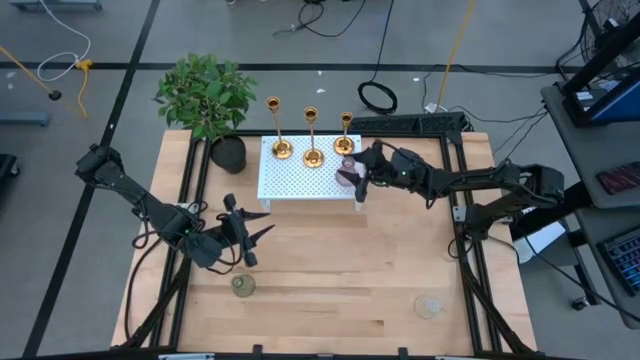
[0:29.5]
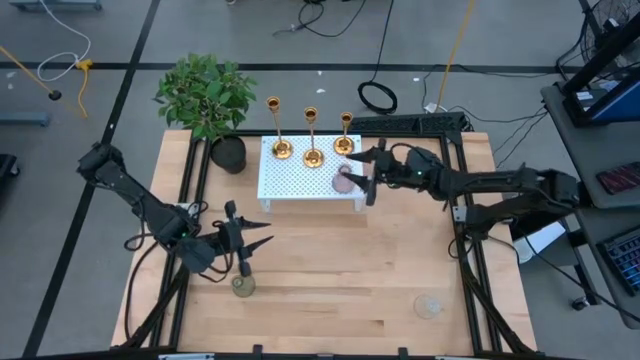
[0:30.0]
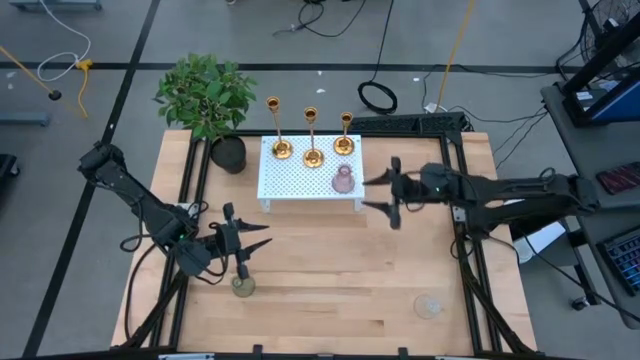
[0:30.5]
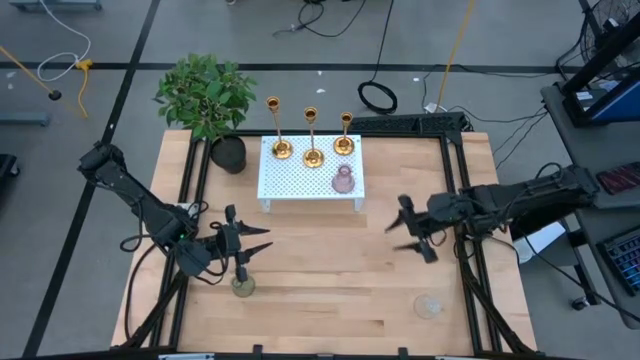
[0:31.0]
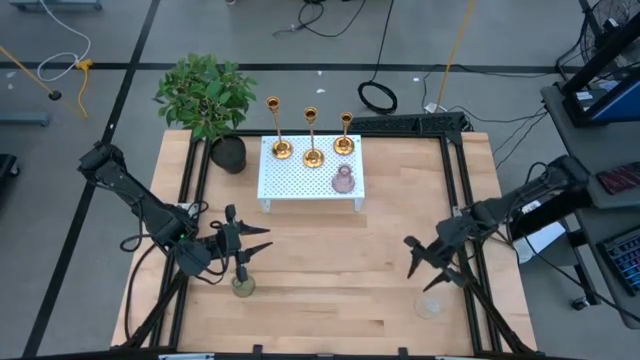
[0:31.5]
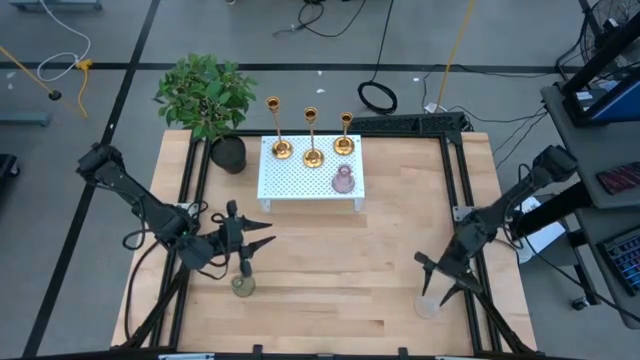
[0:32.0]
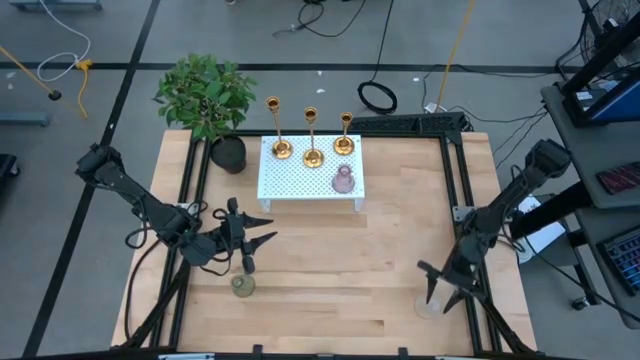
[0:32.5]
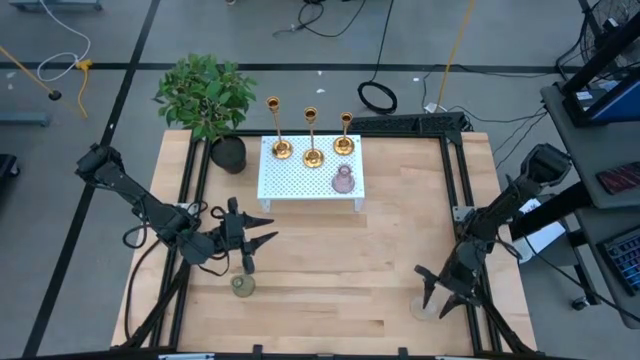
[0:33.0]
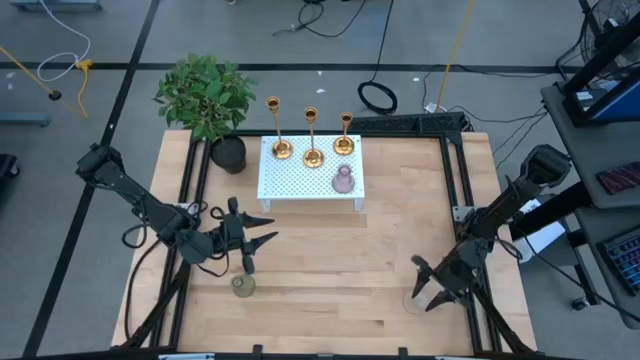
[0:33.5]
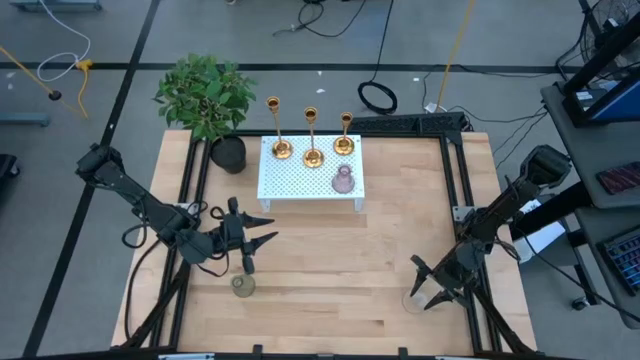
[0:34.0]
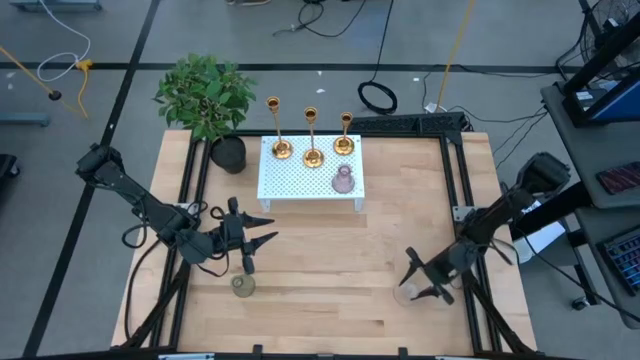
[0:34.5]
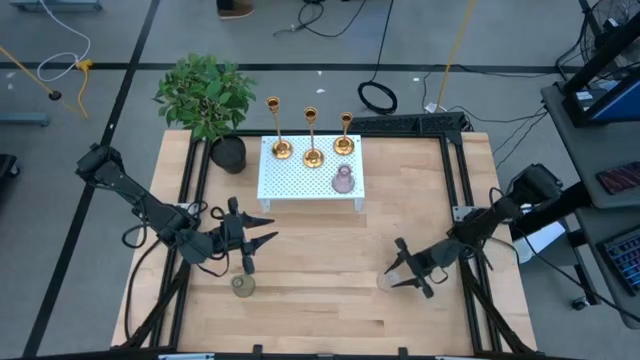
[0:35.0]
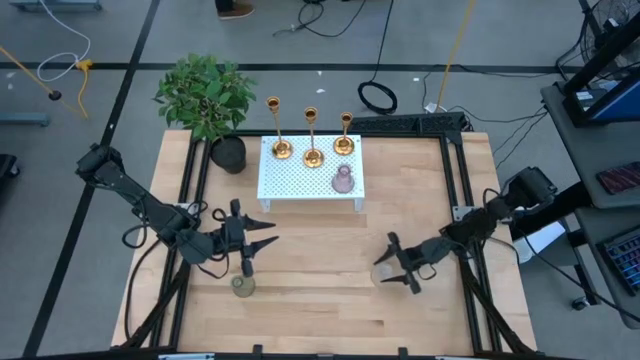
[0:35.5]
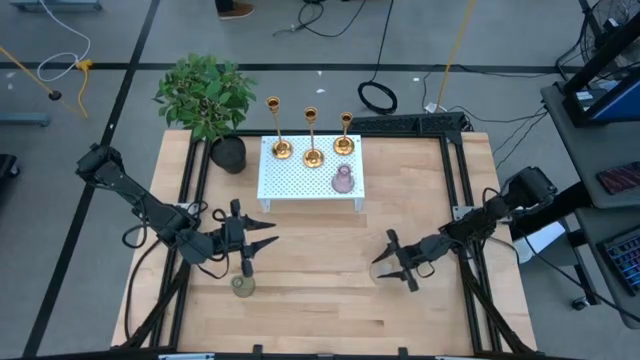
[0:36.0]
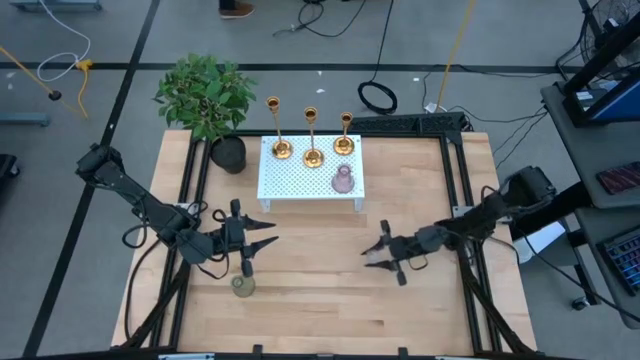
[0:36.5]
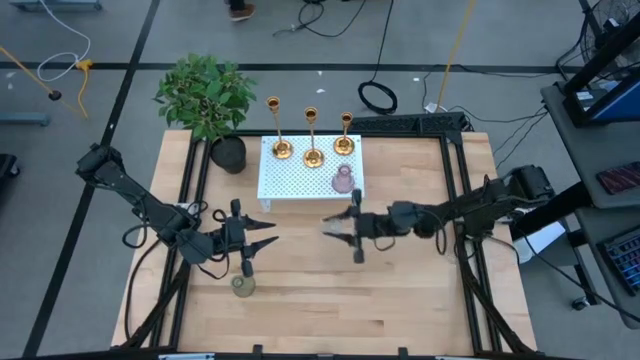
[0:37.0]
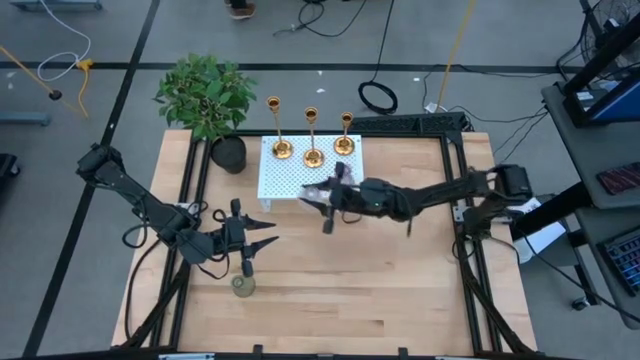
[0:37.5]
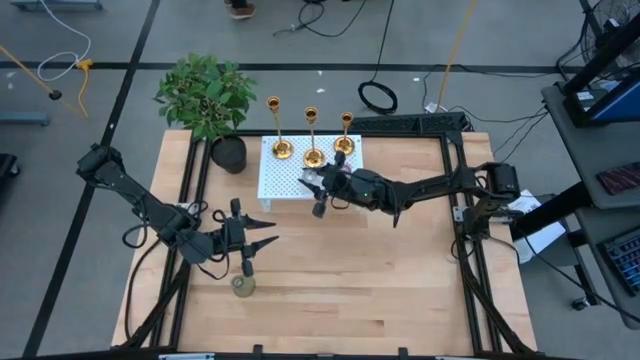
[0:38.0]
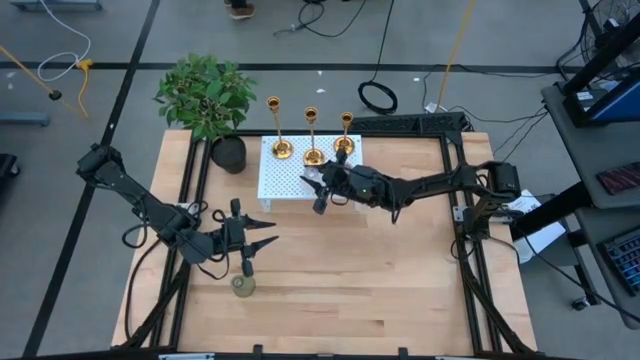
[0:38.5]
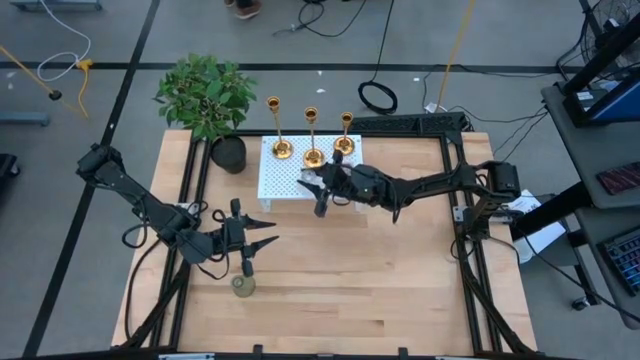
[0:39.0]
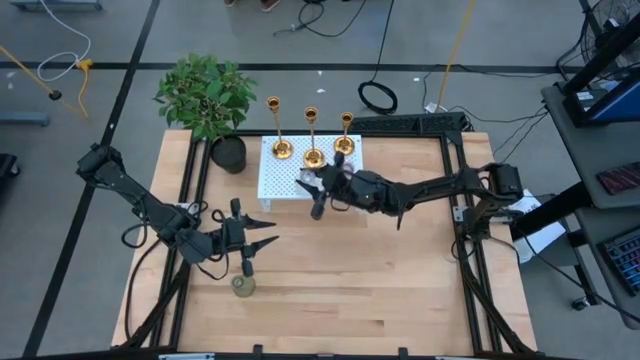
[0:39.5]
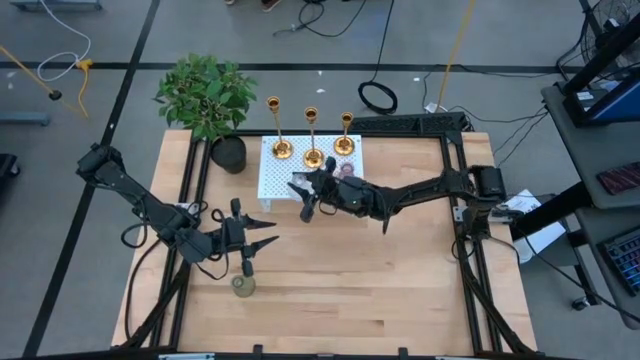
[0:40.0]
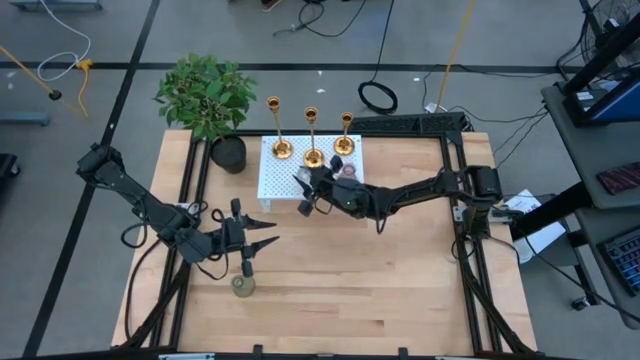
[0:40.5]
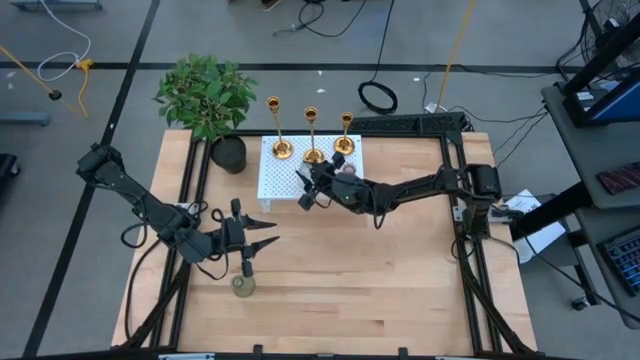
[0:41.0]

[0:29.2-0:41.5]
Task: Pick & Place candle stick holders
Put the right transparent candle holder on the shelf

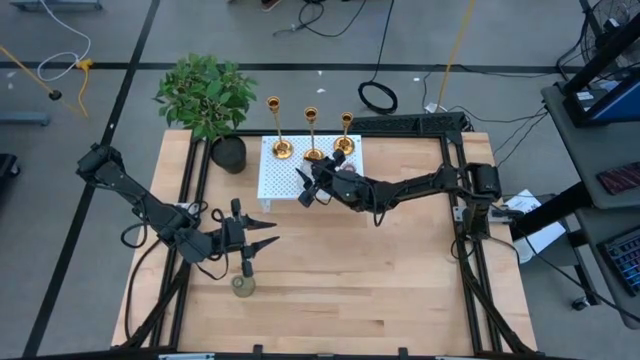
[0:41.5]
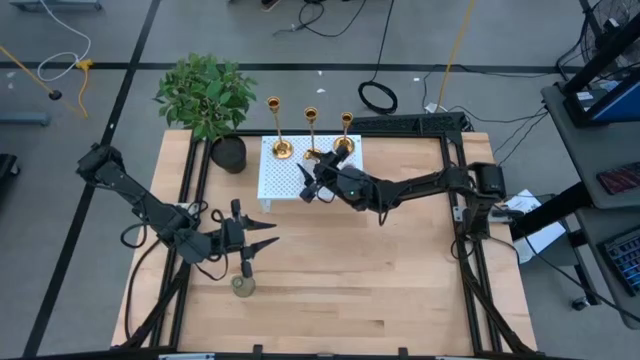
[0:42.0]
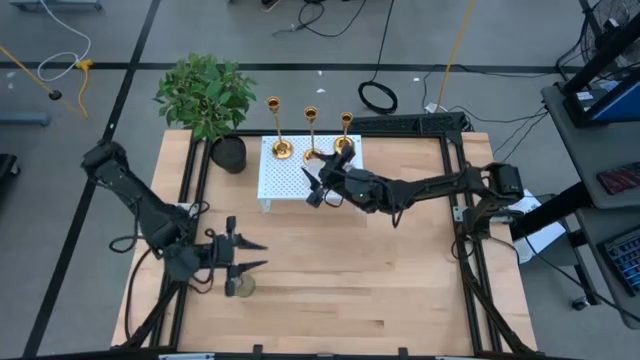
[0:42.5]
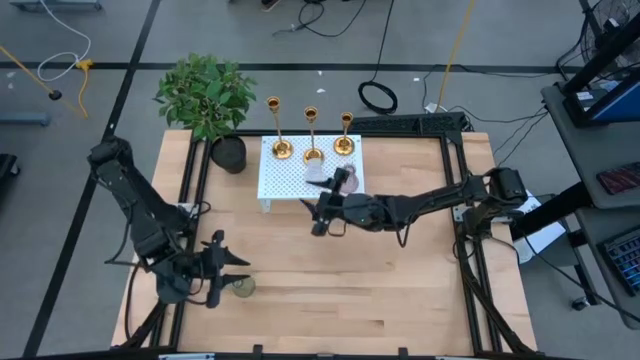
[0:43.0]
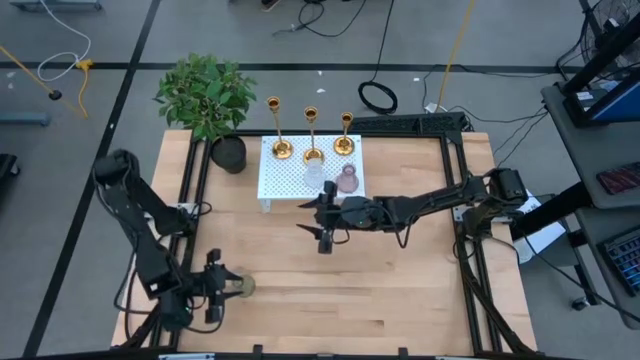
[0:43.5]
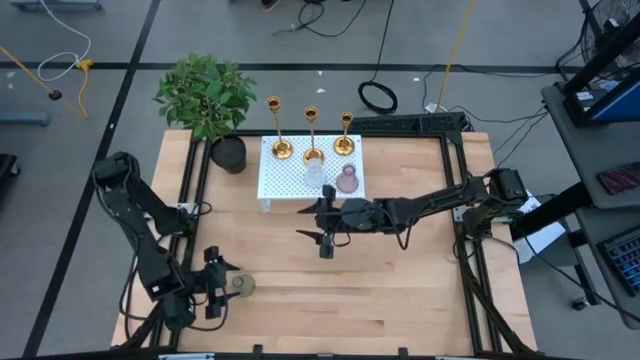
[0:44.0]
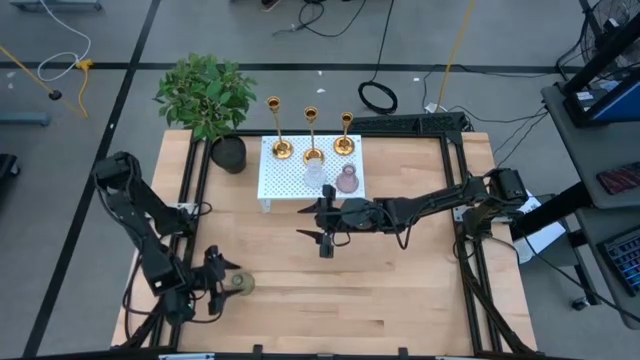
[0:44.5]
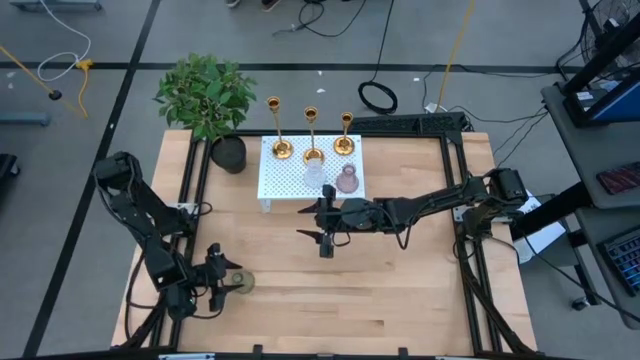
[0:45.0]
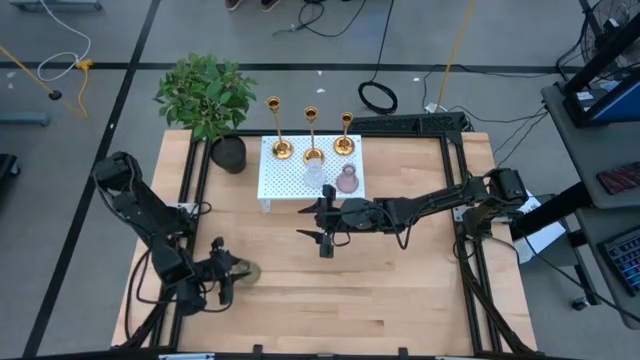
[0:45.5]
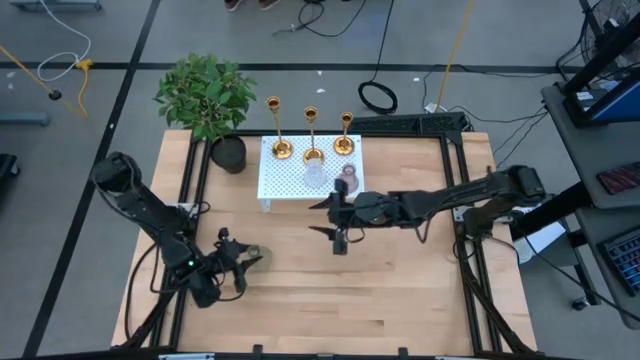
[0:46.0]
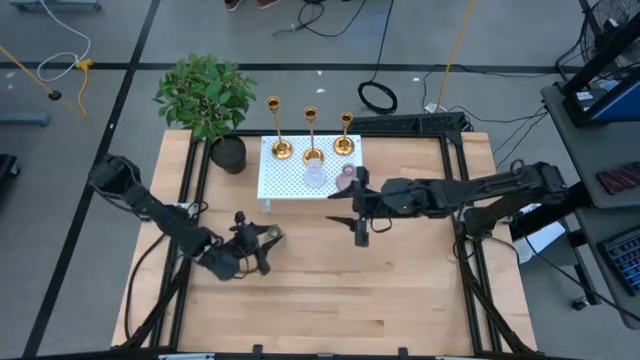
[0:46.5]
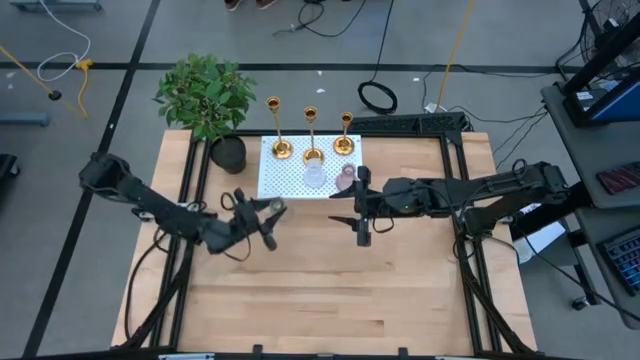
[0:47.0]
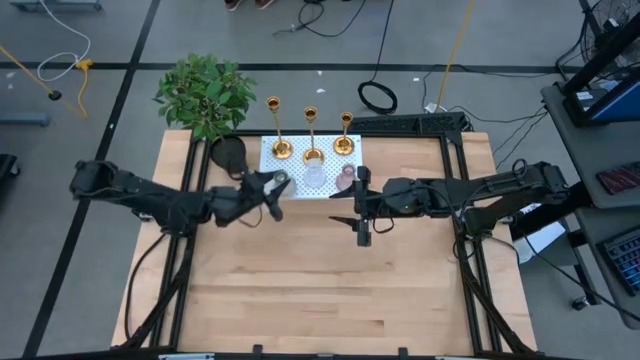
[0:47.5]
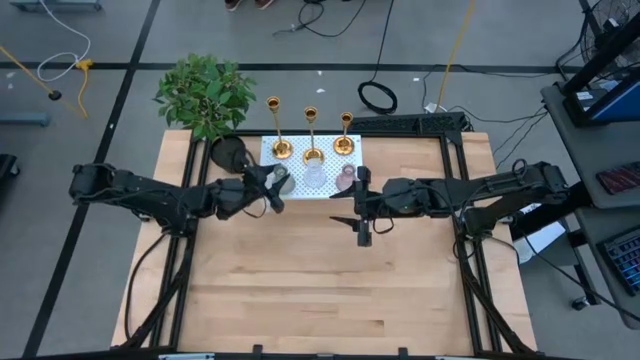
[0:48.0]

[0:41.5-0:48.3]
Put the transparent candle holder on the shelf

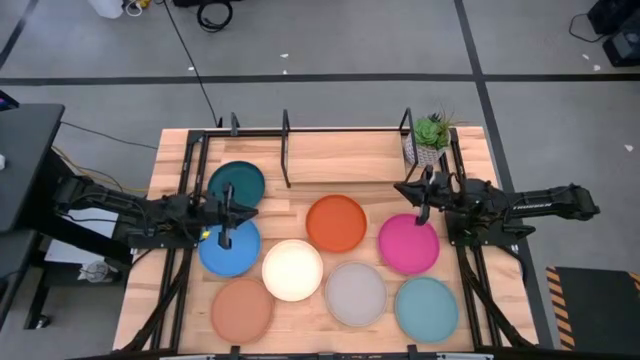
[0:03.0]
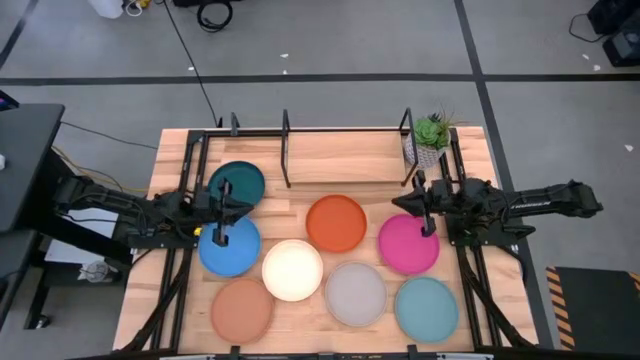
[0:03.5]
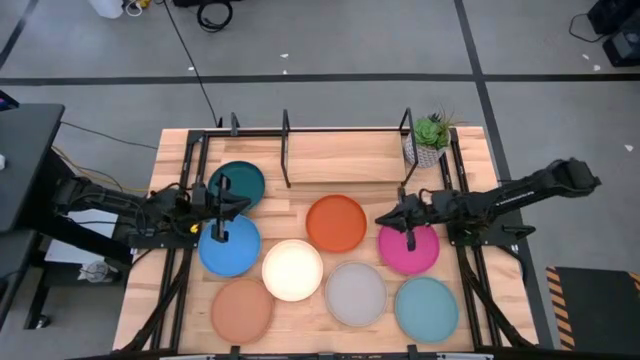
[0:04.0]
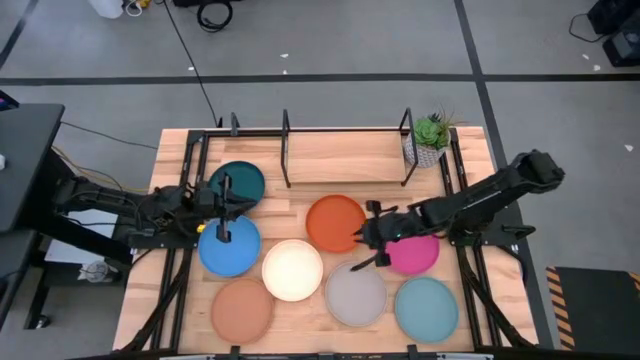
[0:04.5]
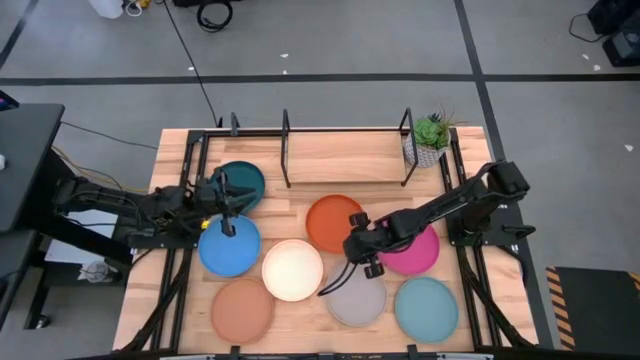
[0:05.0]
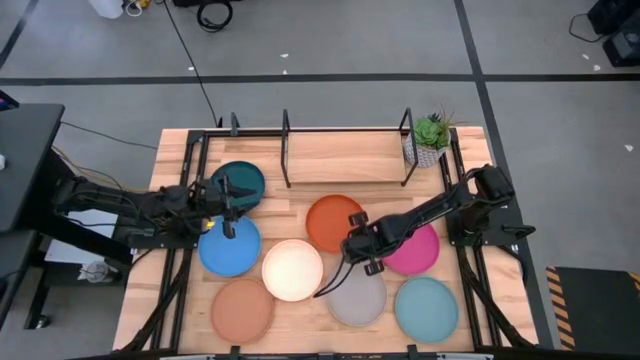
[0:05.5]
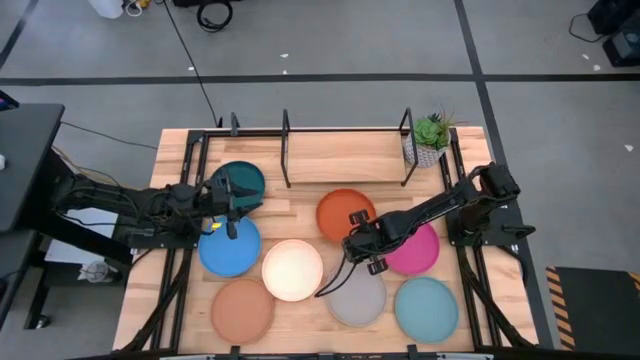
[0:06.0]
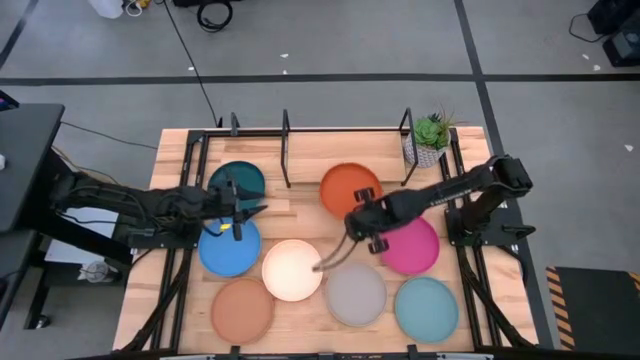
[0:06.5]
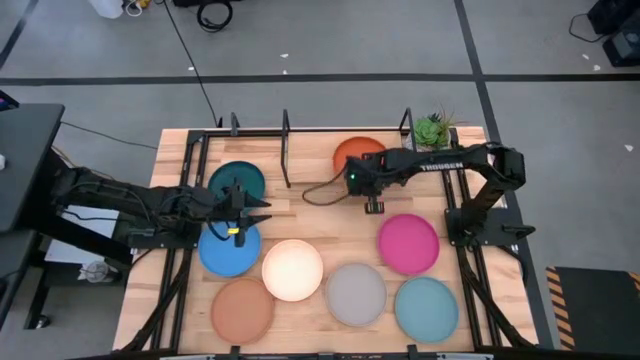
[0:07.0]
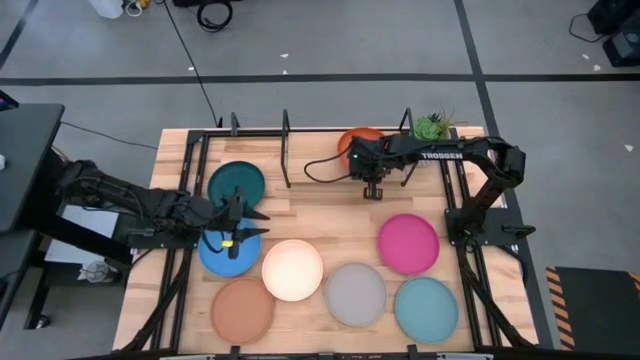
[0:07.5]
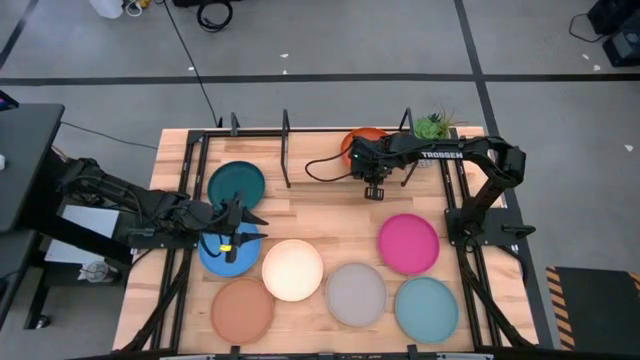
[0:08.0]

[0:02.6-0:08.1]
Task: Place and stack plates onto a shelf
Put the orange plate on the shelf
